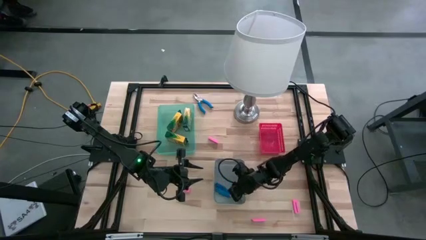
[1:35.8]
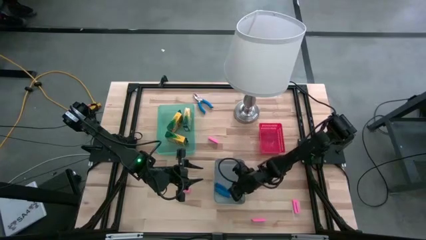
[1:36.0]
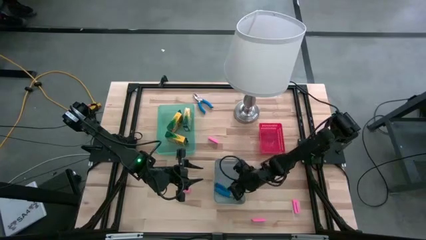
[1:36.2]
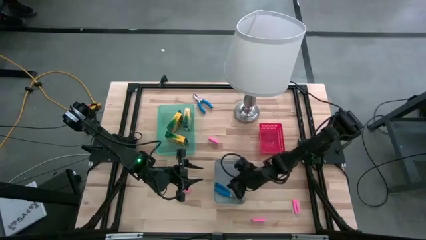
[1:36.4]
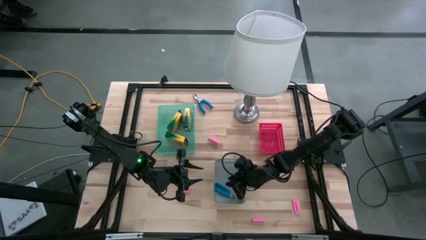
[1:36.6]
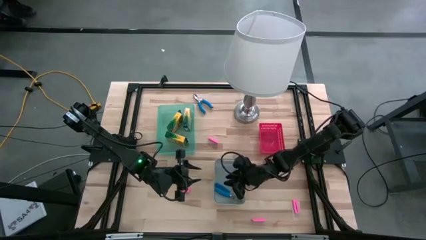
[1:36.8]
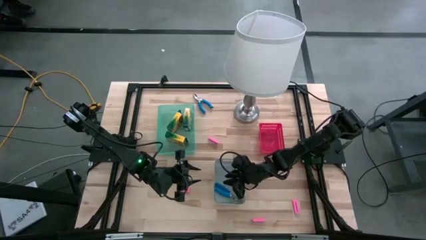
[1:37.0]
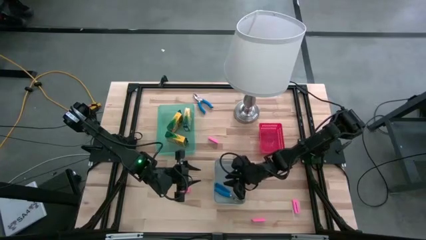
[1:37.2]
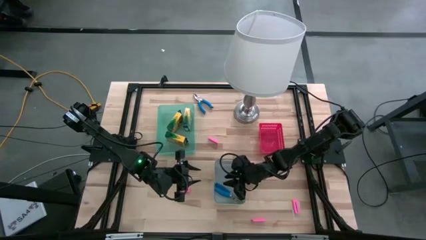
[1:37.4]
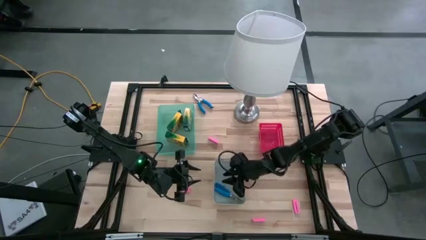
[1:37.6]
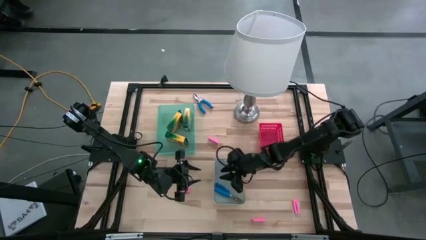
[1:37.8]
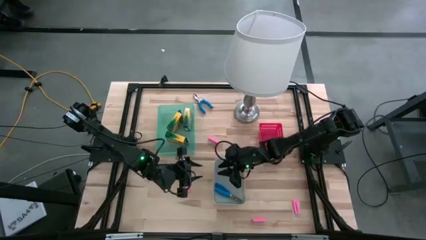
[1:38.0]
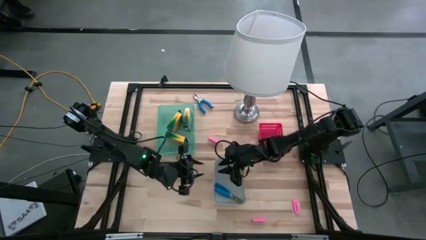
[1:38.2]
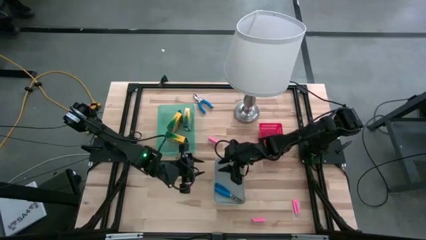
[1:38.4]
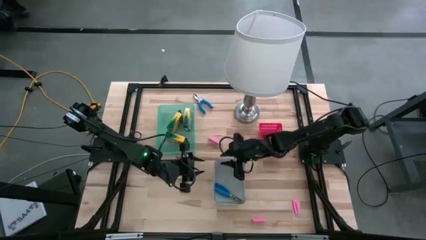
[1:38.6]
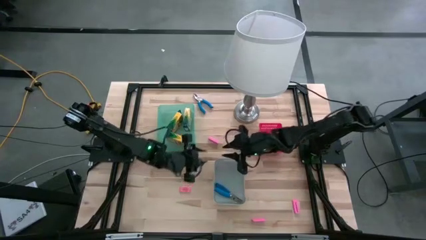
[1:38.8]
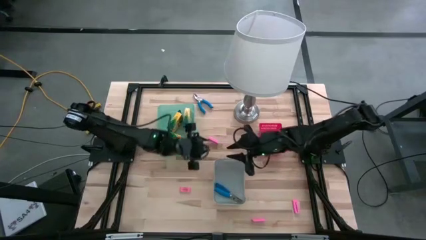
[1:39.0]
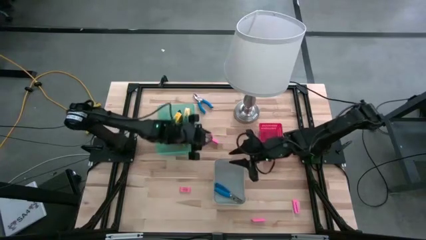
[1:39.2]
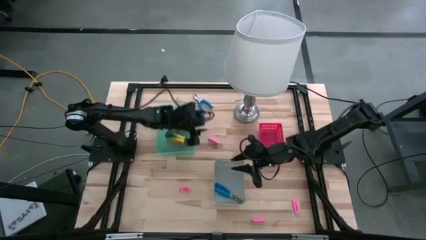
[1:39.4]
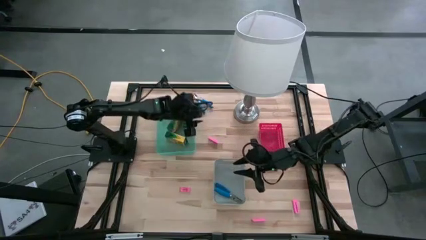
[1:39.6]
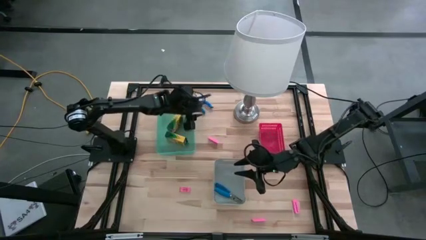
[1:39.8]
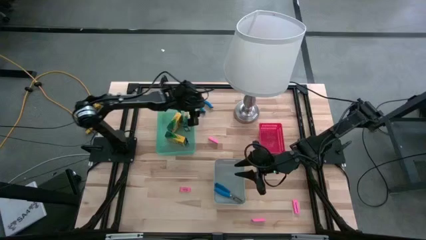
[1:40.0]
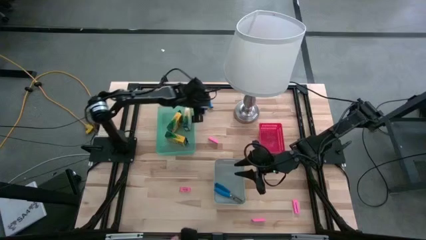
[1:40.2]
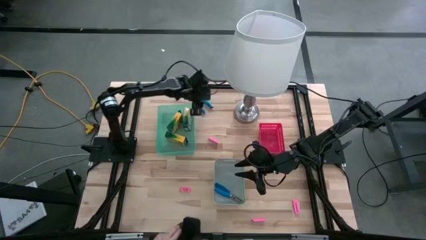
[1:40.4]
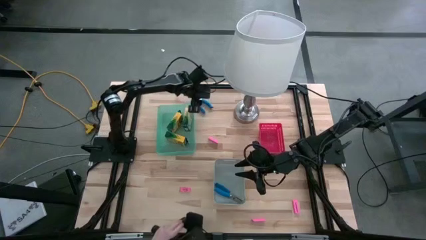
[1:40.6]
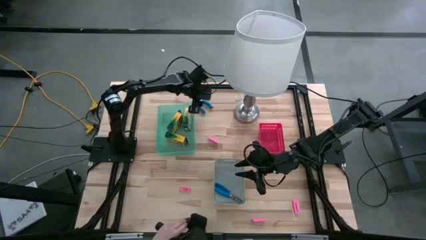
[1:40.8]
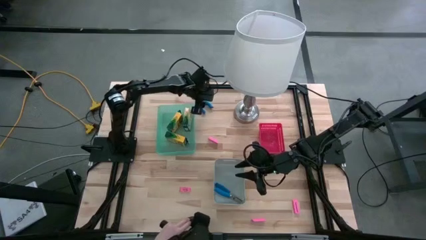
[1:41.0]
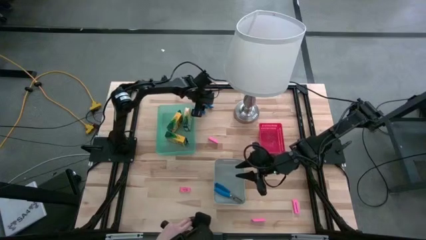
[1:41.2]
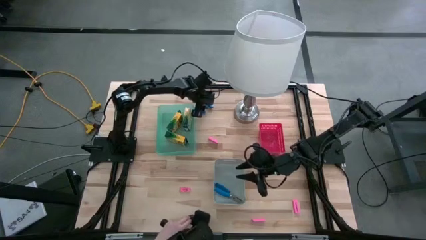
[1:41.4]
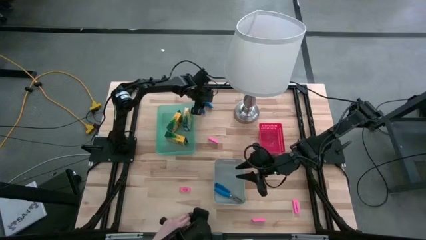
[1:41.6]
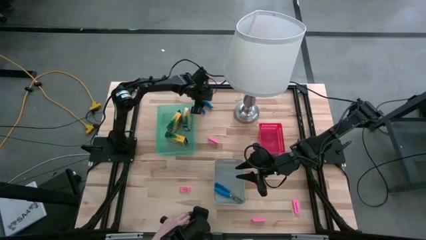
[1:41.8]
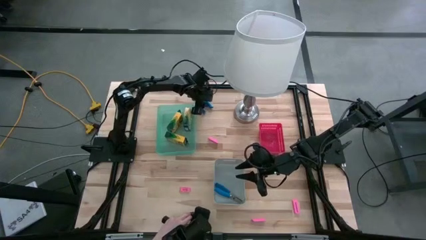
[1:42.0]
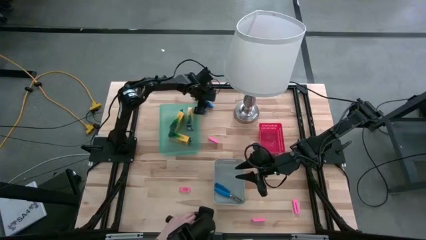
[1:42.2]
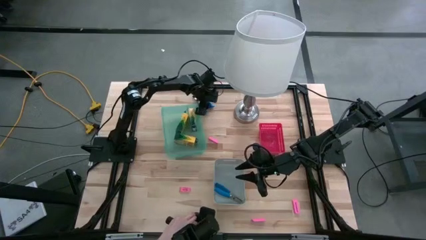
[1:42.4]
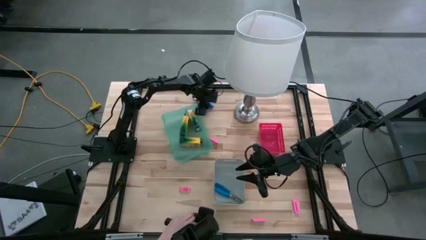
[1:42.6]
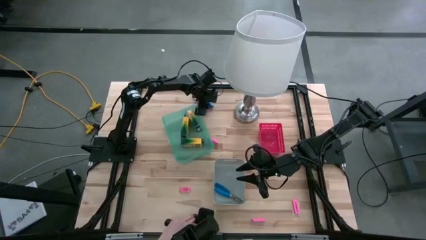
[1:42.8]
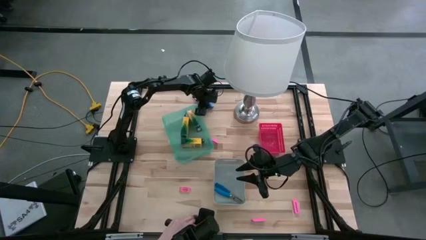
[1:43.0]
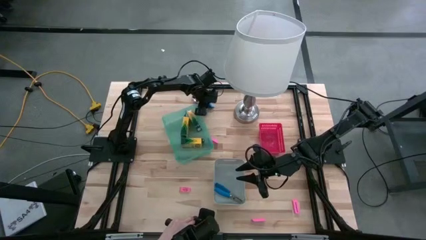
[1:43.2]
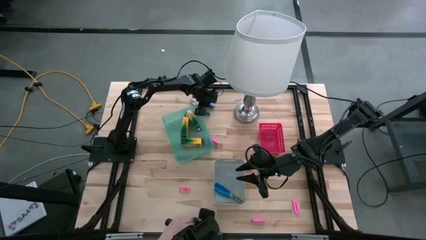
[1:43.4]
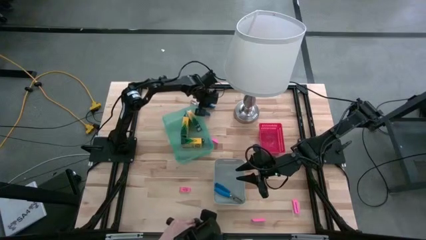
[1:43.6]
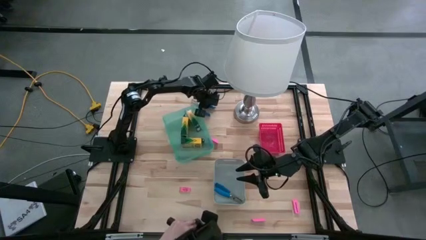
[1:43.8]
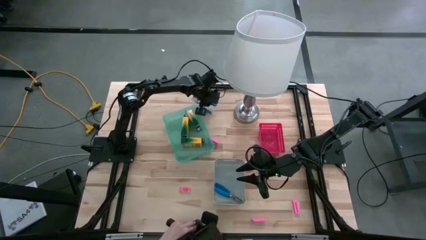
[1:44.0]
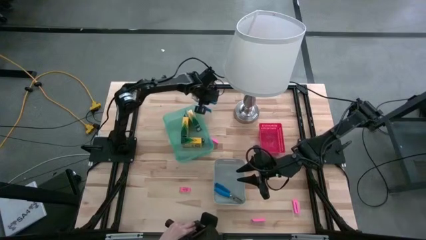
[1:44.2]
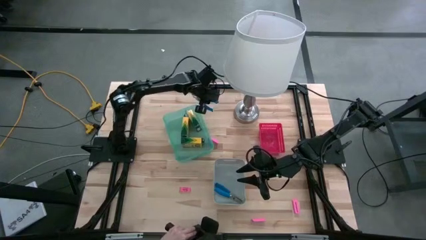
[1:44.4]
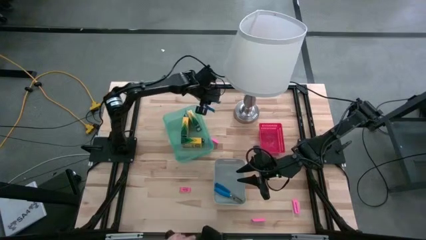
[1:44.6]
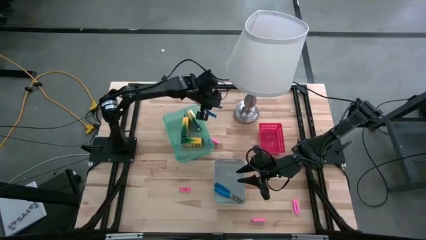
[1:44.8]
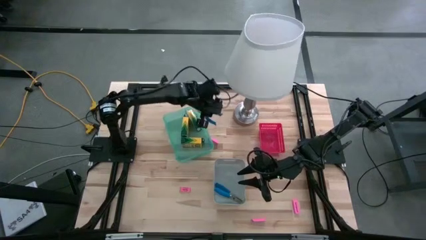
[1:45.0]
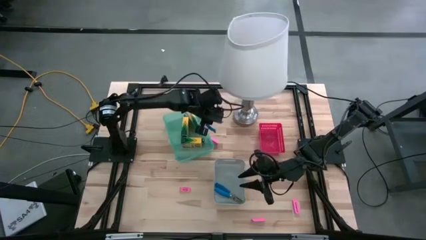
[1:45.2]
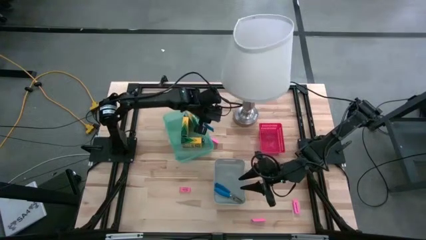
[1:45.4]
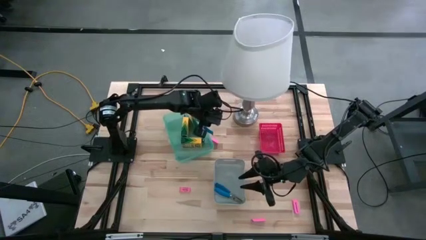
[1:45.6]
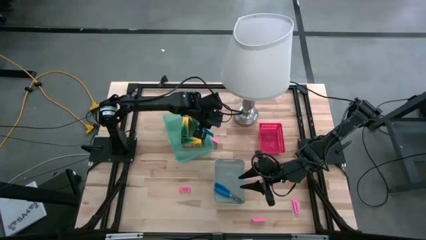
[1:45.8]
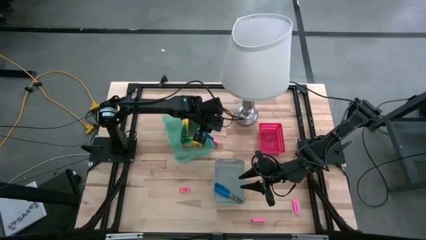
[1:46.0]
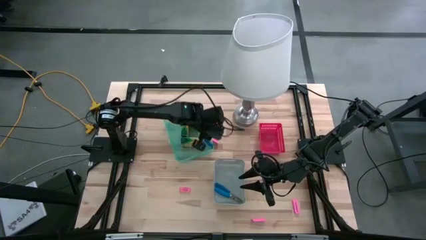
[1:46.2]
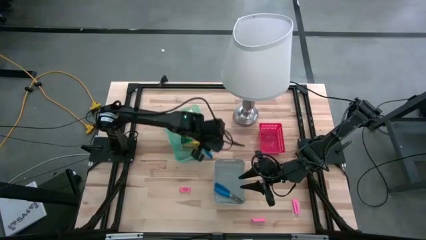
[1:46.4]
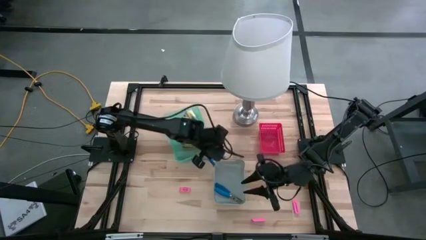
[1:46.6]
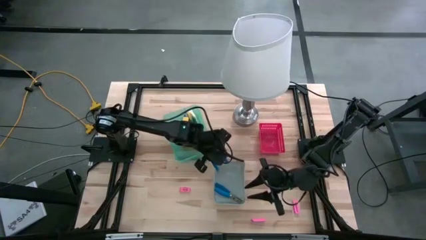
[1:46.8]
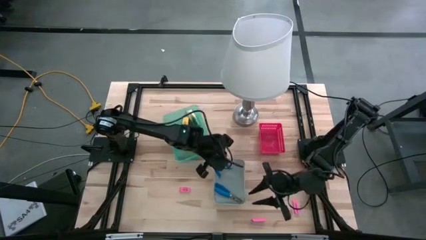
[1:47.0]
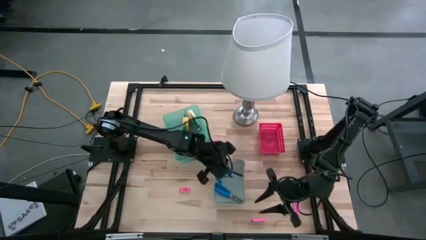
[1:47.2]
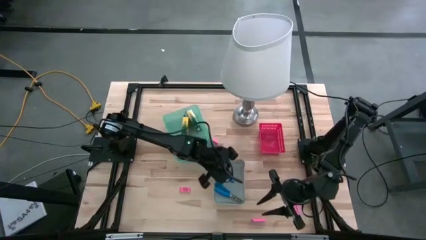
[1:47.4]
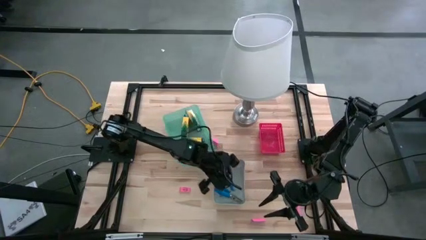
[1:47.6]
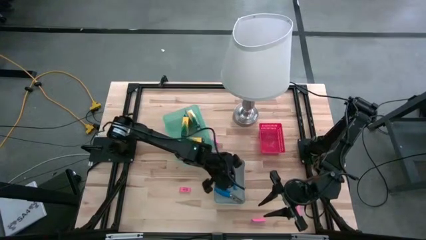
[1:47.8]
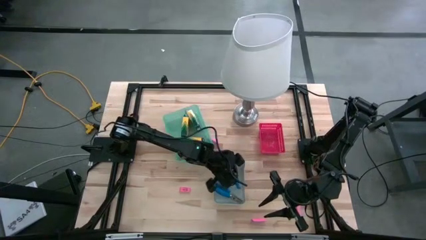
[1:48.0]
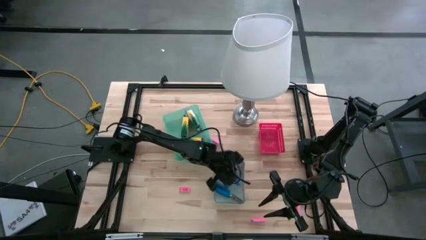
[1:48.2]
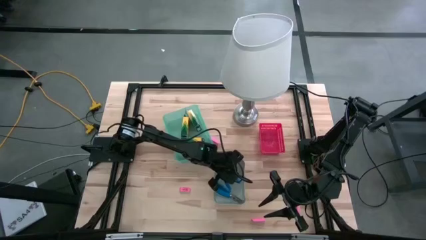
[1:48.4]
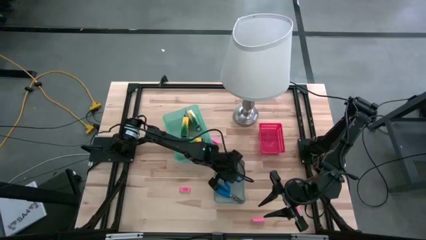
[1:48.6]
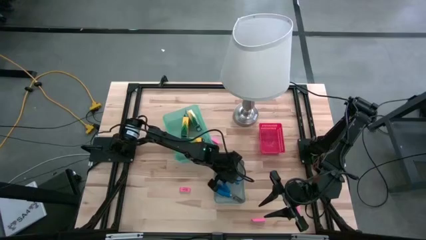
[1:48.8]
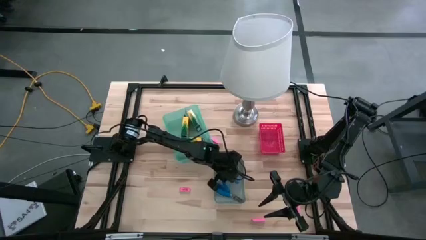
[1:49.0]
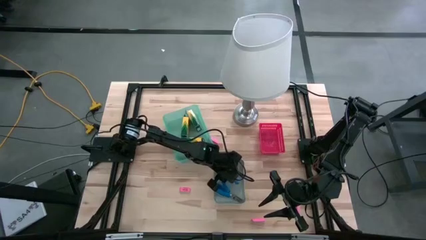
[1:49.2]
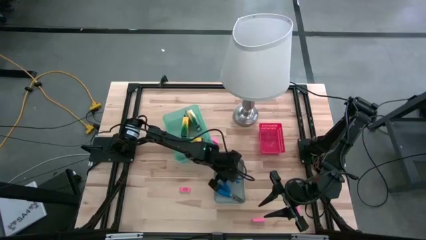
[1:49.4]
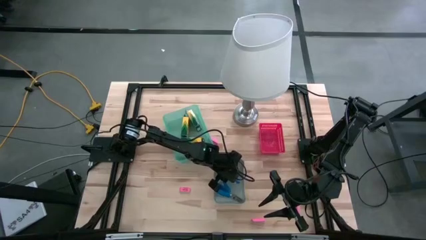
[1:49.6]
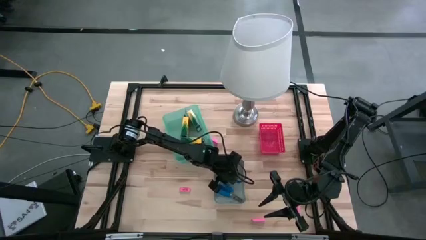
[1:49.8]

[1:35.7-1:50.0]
Task: Pick & Place School Supplies
Put the blue puncher into the gray bin

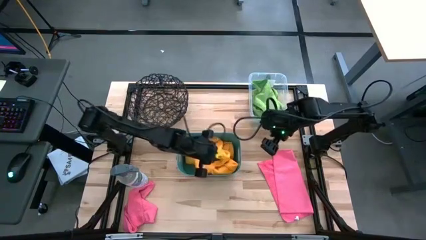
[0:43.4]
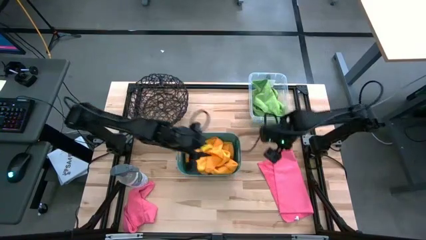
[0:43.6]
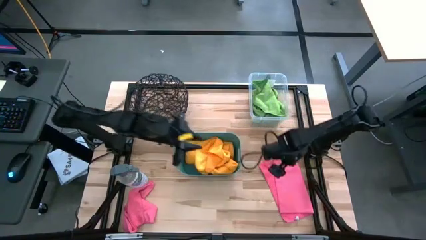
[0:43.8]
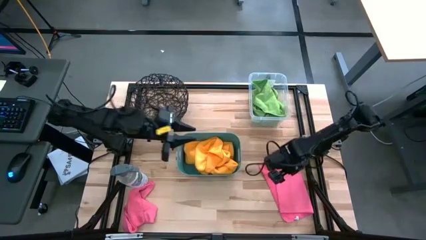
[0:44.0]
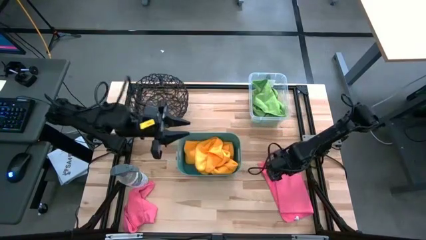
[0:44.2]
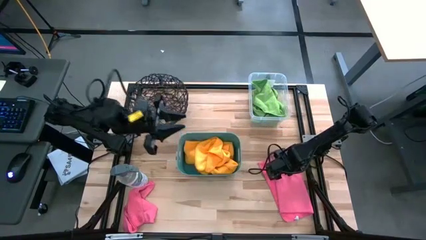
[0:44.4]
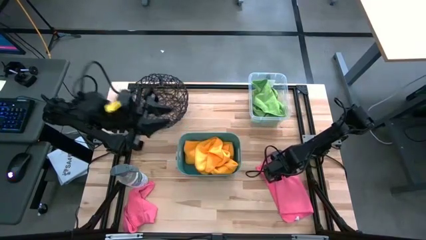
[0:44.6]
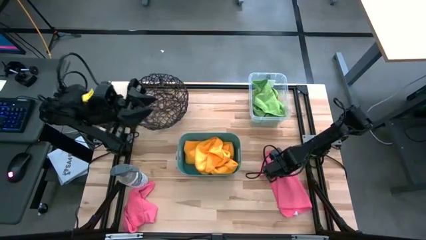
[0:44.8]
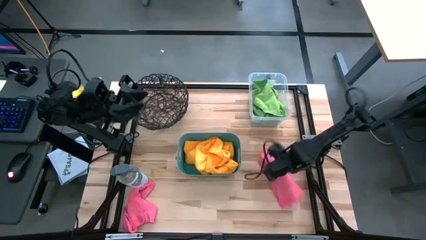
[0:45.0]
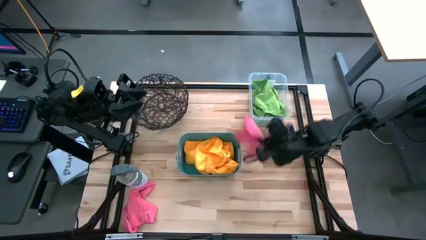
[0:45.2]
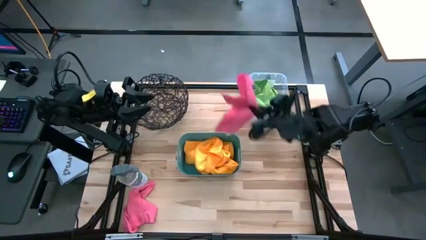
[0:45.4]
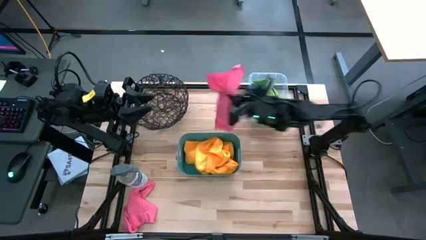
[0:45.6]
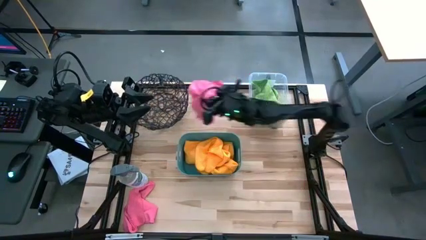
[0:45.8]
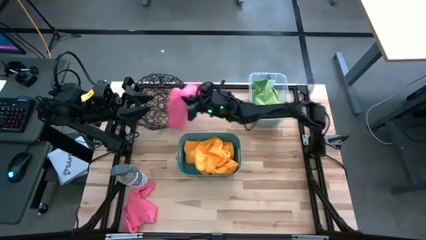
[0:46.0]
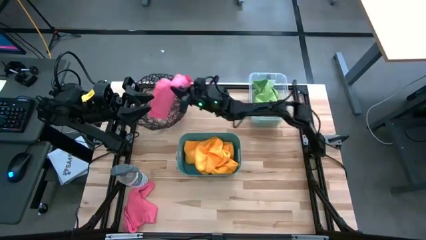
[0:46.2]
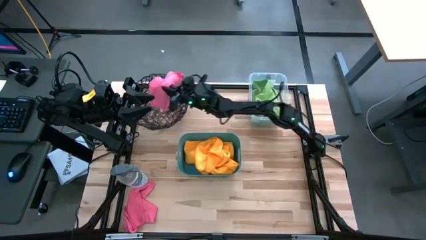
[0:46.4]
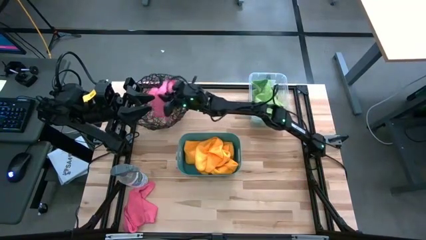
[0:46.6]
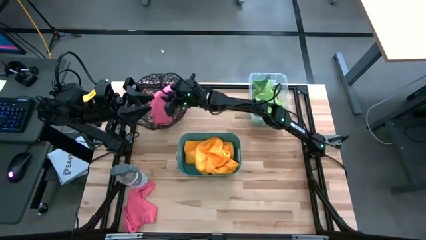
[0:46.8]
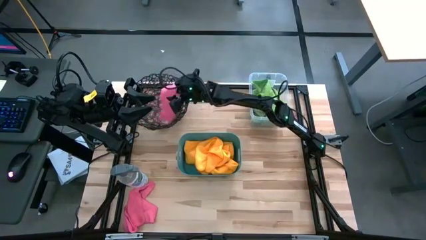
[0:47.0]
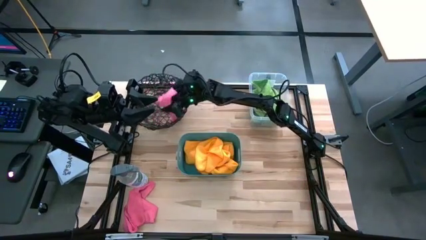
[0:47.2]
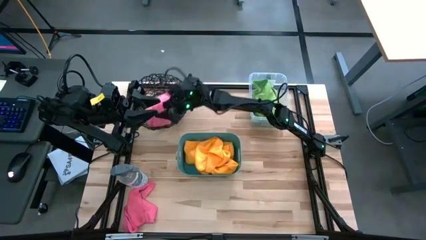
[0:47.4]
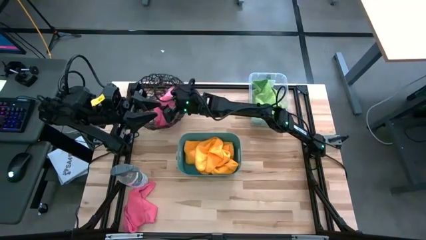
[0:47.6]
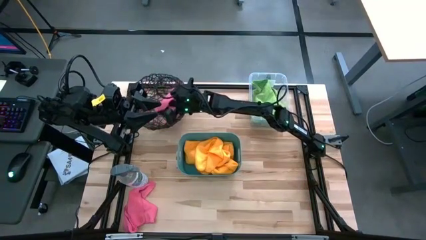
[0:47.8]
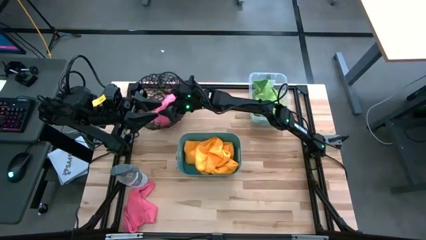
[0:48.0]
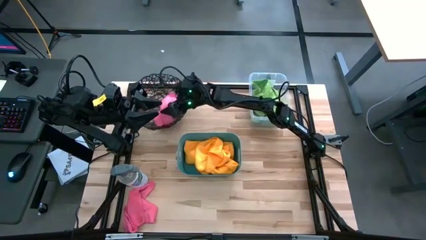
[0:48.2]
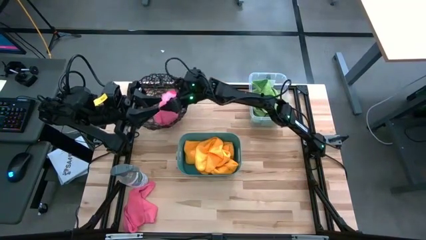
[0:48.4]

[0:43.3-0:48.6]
Task: Sort microfiber towel by color & place in baskets
Put the right pink microfiber cloth into the wire basket
